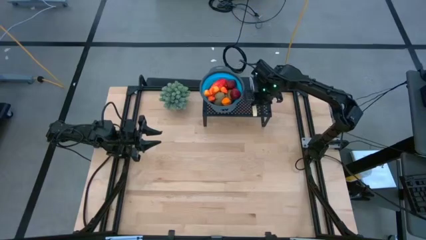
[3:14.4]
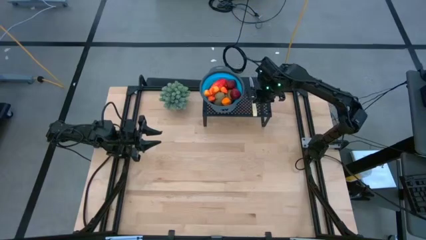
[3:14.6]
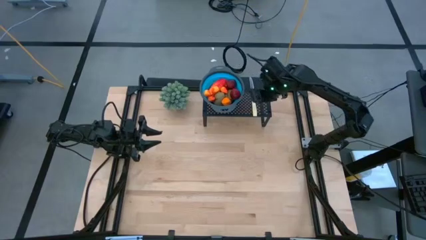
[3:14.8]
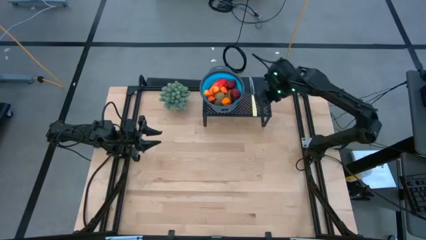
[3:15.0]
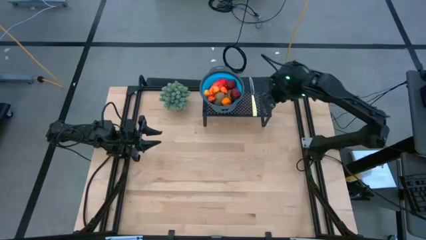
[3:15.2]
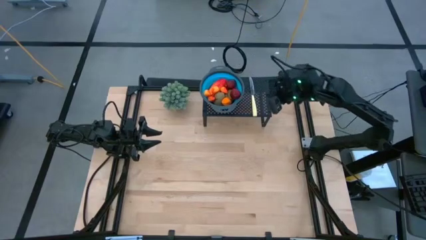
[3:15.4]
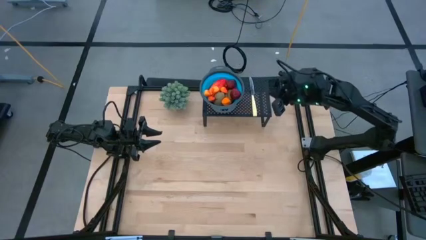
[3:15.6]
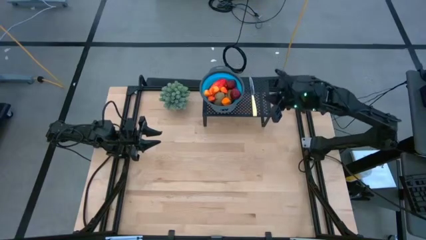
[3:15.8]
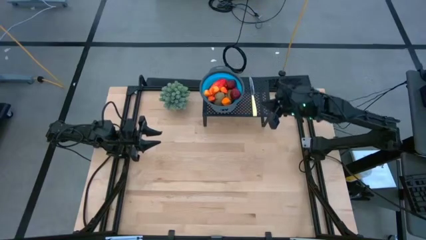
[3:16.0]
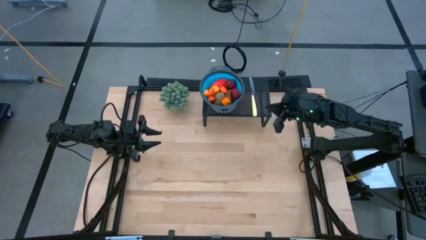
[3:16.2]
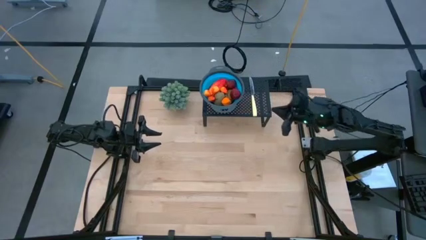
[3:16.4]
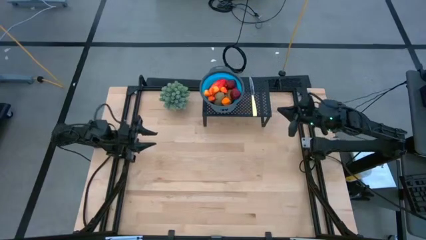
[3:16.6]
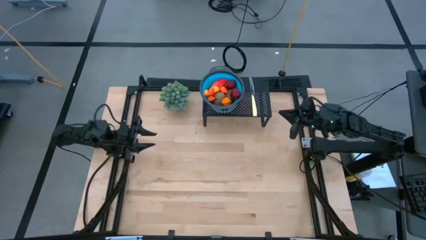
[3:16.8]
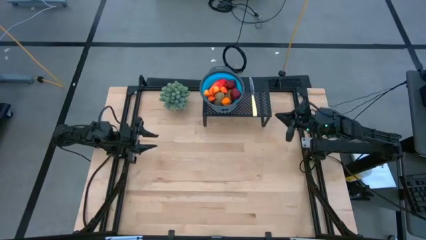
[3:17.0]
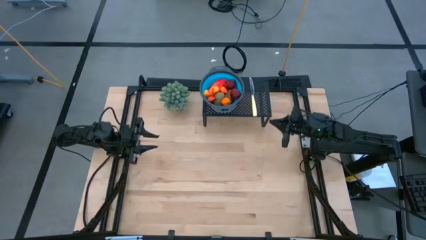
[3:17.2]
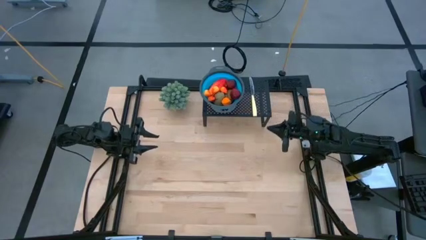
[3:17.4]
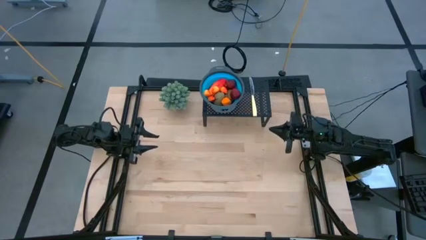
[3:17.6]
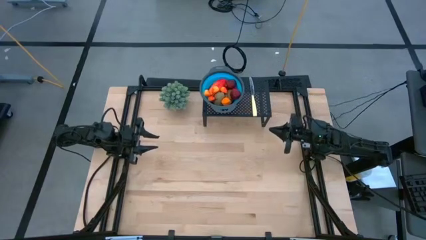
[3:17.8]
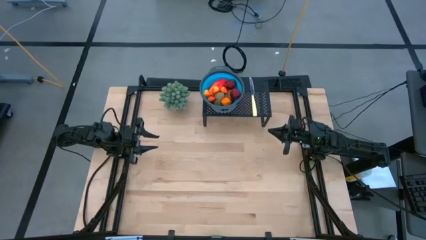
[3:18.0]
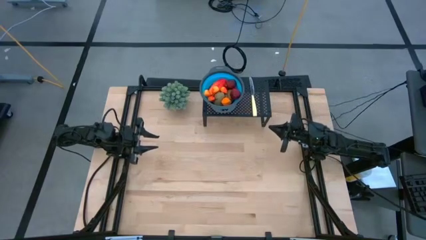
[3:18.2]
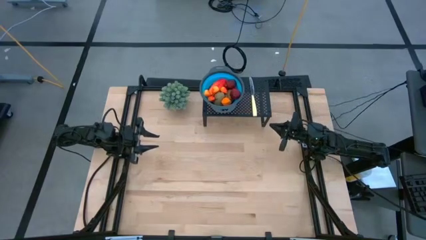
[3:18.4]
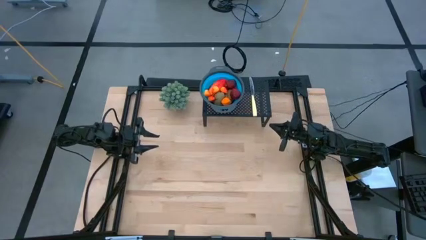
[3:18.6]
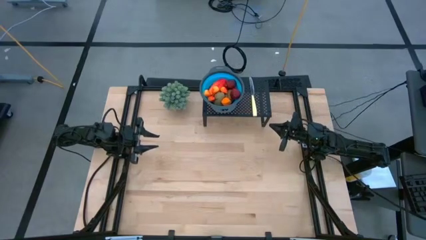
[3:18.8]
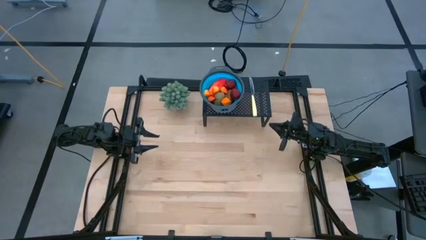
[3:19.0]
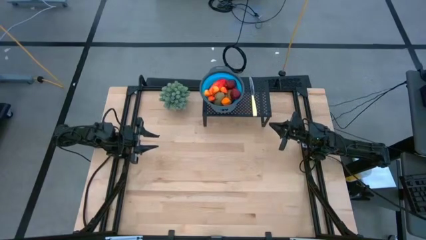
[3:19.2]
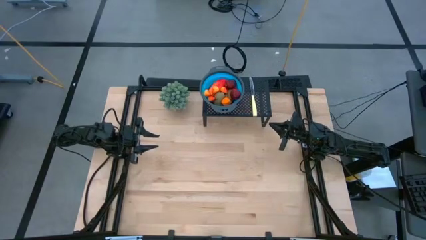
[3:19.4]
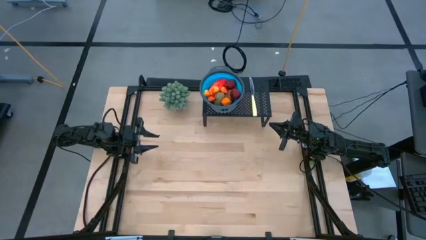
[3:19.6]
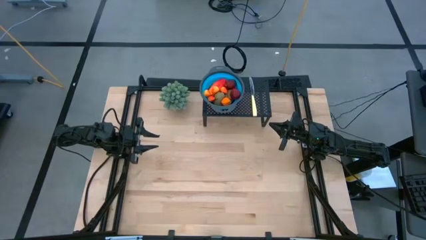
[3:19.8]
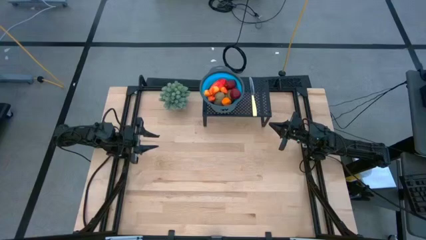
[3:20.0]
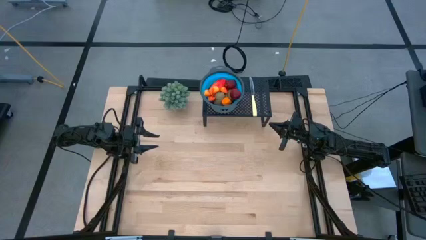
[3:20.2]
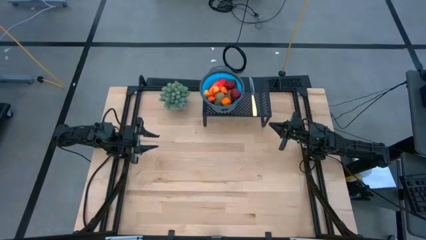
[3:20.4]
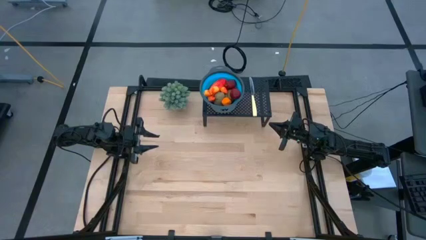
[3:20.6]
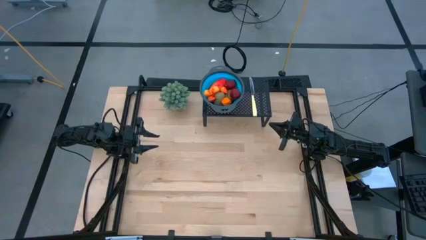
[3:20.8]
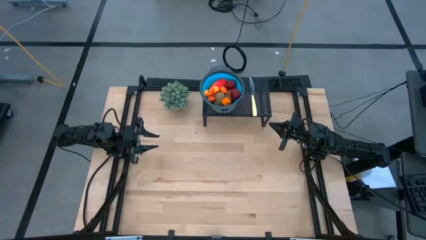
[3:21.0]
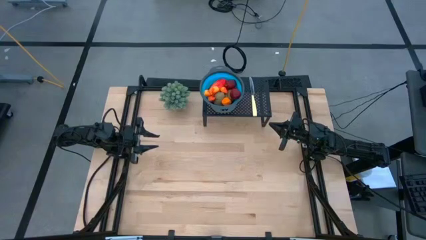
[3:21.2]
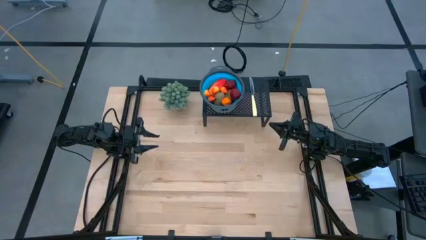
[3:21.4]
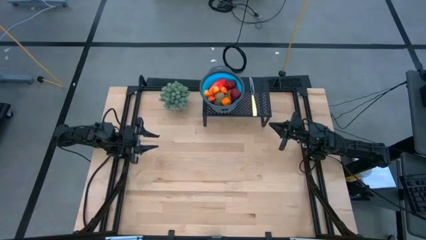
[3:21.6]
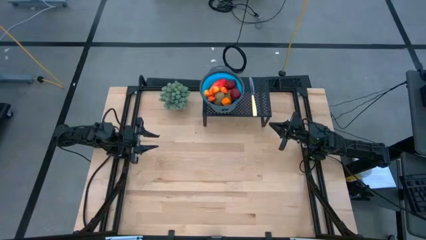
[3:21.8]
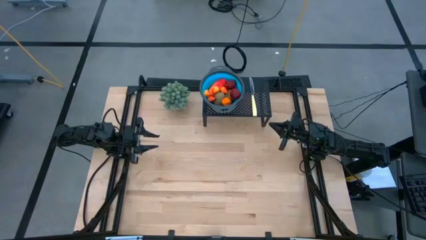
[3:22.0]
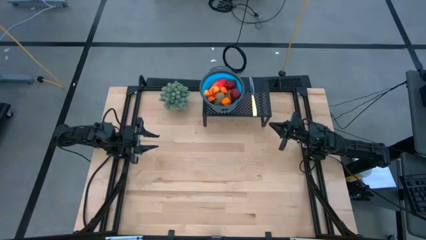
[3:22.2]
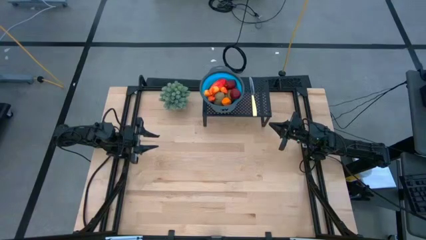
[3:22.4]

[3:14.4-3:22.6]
Task: Pick & Place Fruit
Return to Home Position

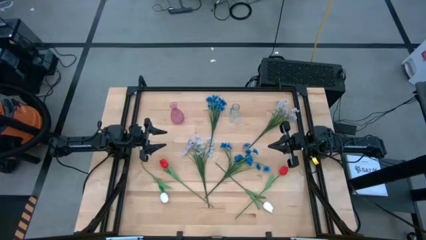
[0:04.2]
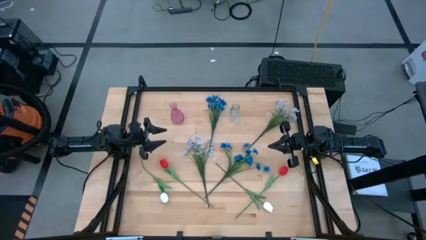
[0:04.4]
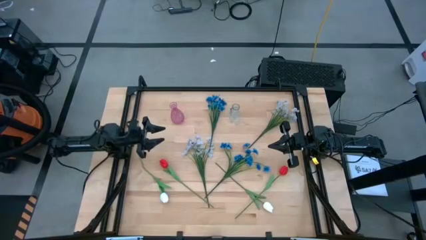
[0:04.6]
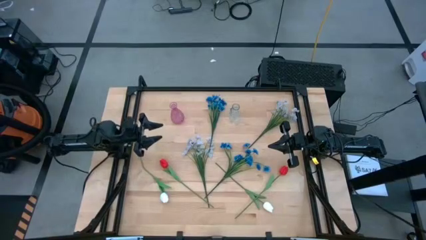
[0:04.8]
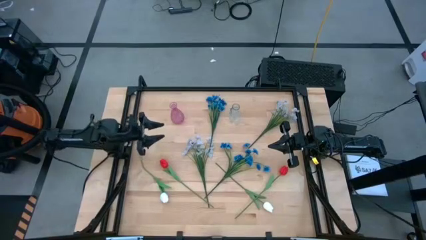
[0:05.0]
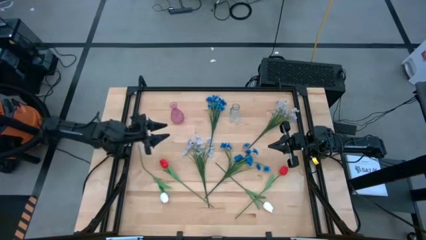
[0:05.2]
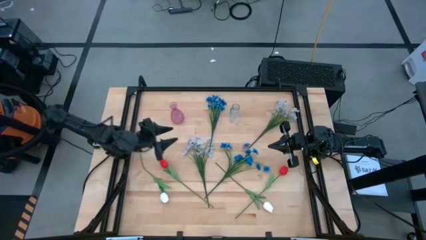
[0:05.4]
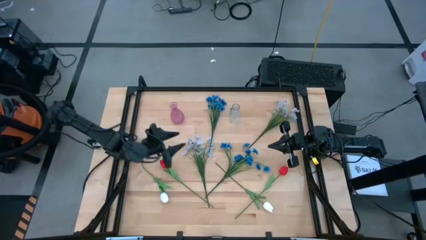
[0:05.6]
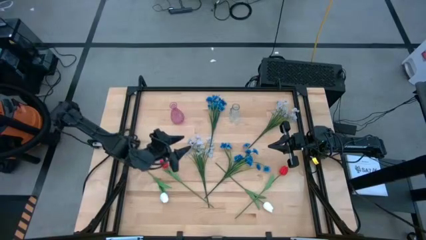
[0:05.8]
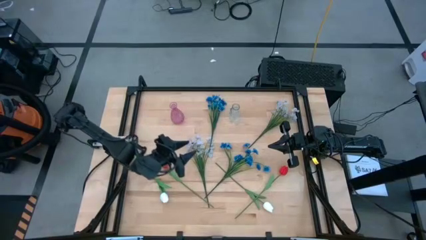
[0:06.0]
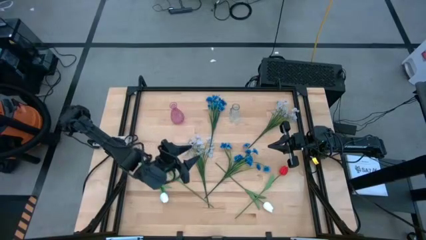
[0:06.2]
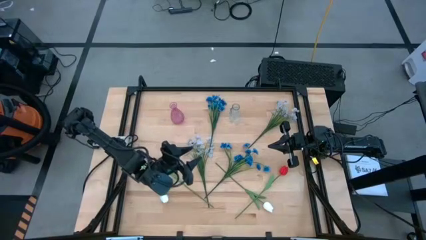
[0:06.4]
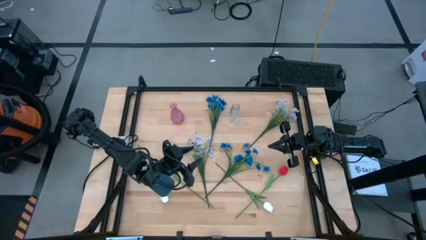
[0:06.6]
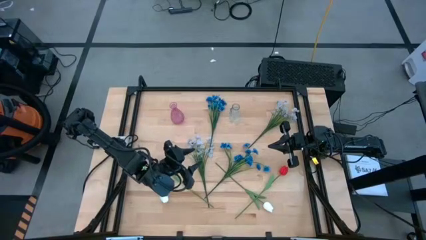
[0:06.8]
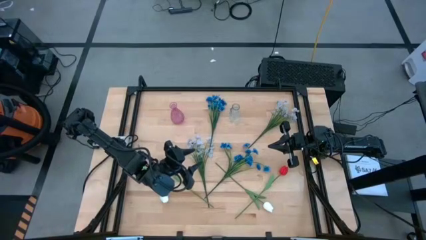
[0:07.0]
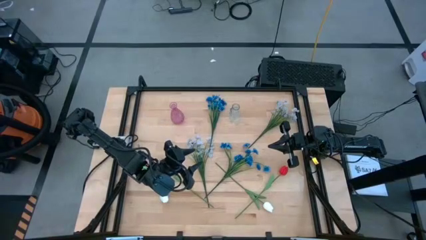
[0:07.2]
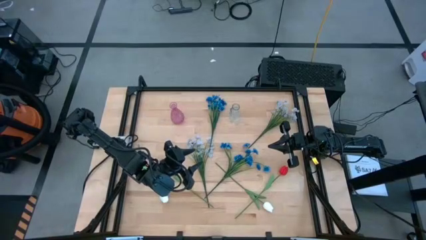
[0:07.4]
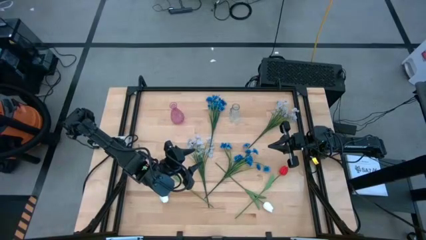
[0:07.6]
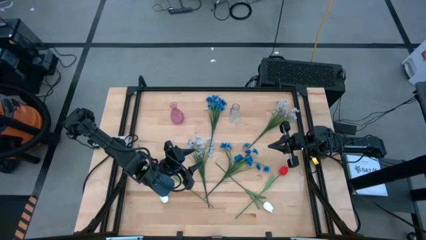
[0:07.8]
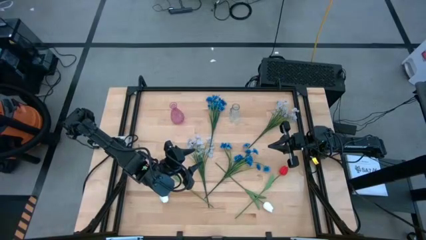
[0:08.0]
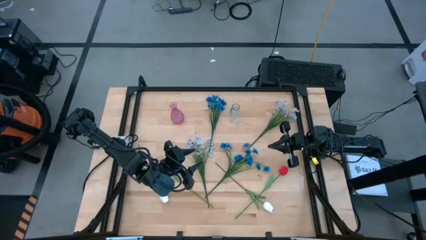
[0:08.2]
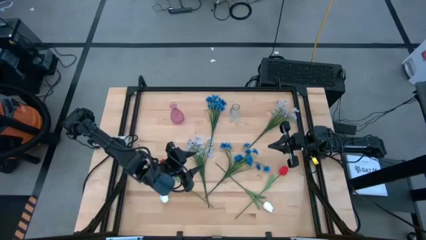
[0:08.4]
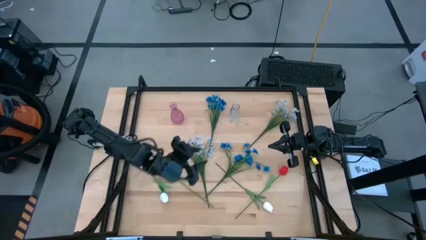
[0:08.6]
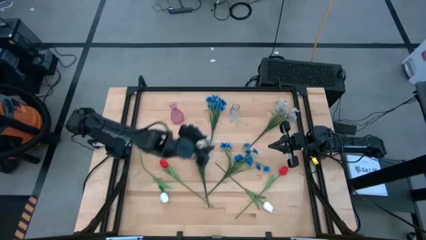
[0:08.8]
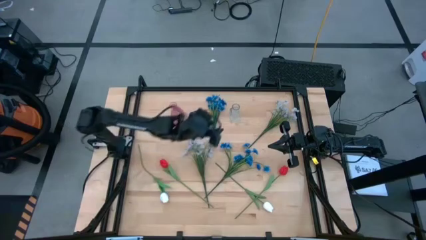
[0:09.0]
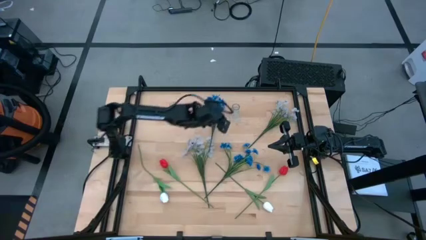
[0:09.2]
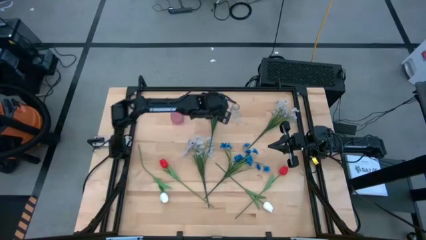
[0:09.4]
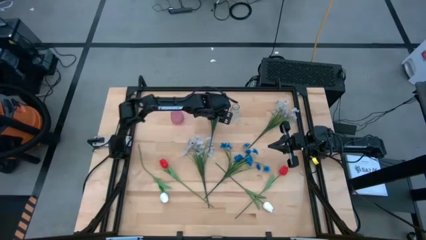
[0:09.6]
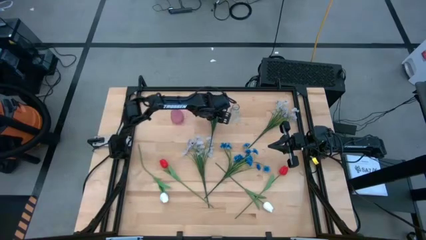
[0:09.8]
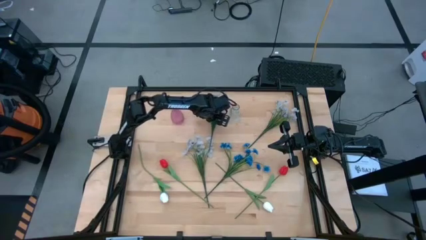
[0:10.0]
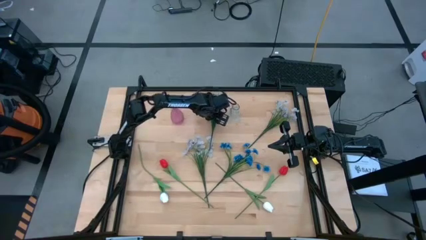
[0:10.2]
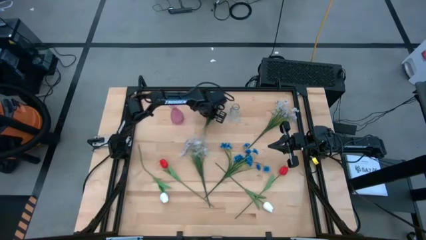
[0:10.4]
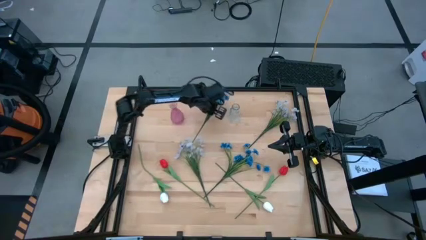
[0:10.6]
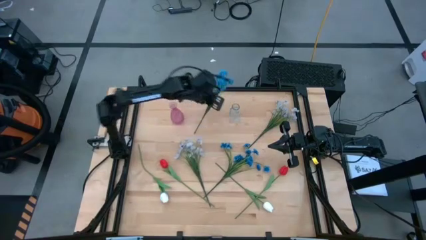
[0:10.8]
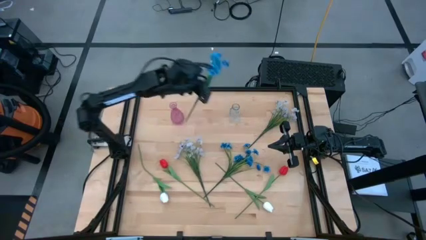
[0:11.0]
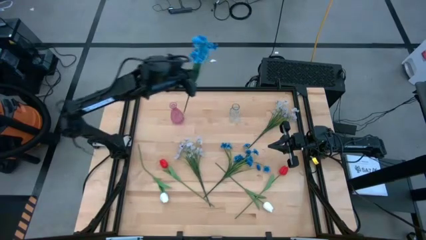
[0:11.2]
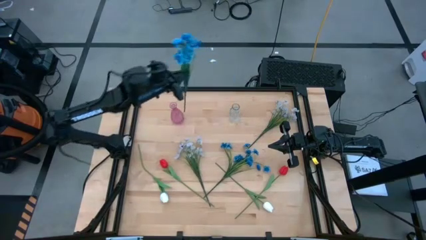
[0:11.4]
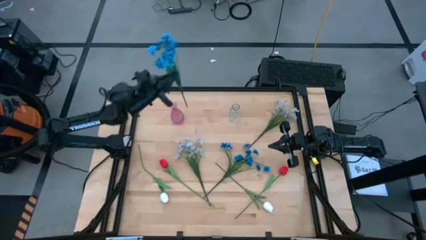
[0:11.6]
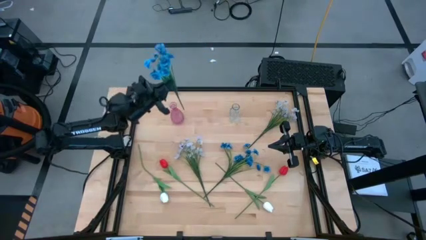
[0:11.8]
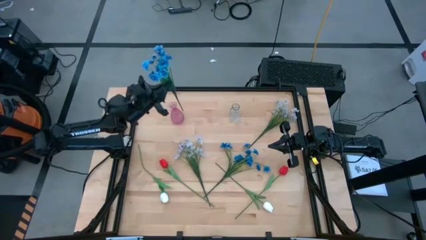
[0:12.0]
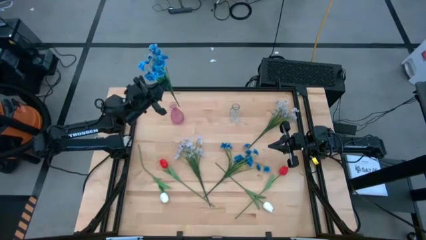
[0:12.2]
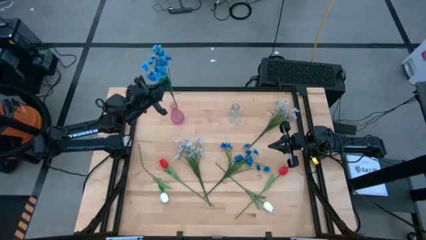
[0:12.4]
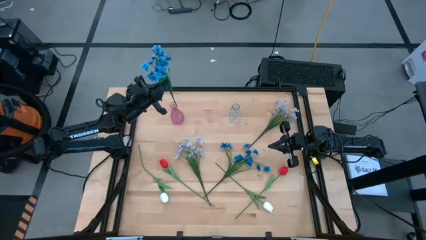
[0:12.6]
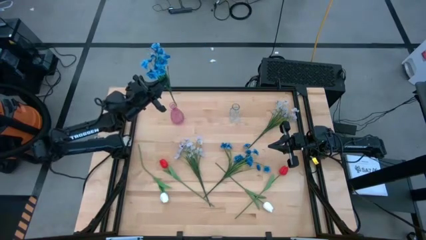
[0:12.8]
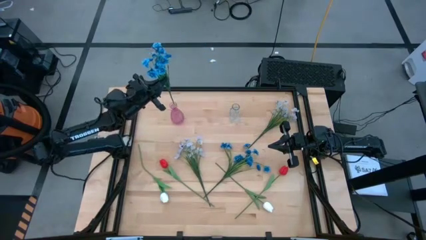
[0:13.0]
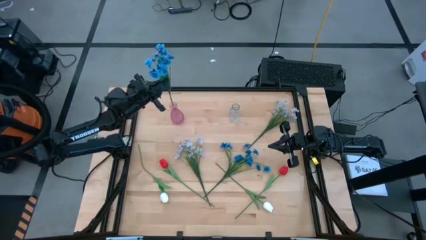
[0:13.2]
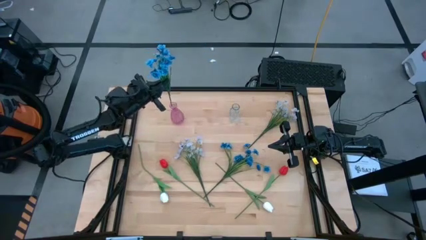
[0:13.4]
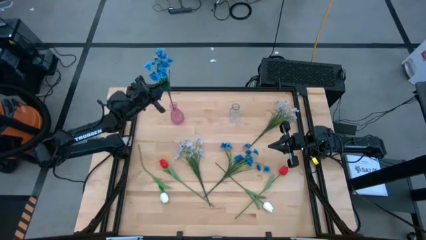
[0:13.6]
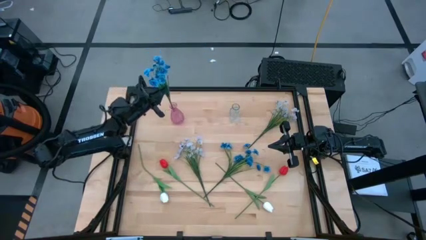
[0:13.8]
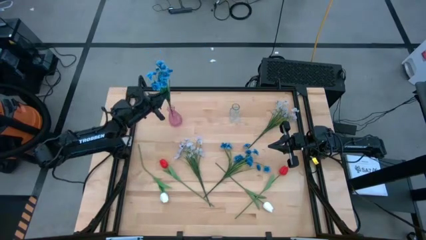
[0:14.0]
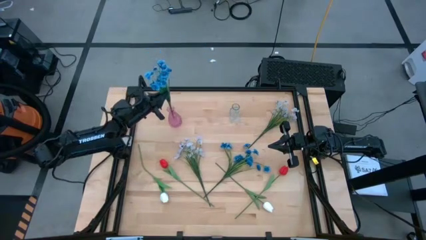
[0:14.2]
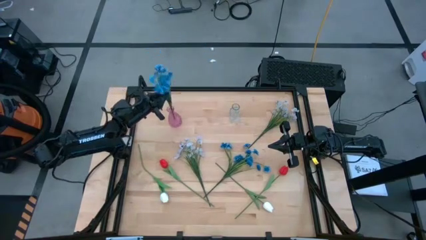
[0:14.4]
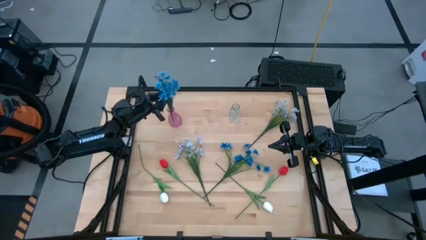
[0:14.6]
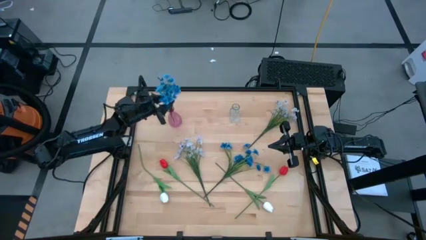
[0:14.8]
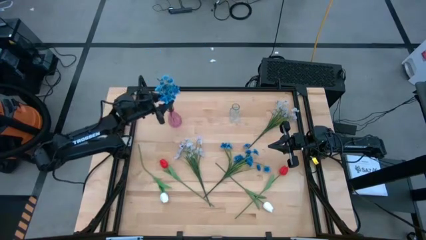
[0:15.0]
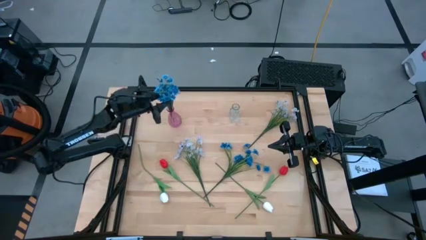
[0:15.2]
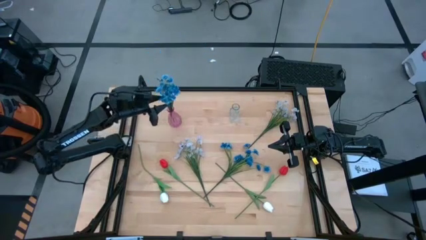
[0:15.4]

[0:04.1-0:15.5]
Task: Sort flowers into vase by color
Put the top blue flowers into the pink vase
